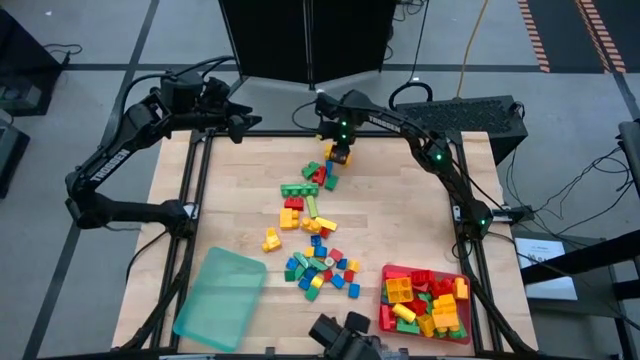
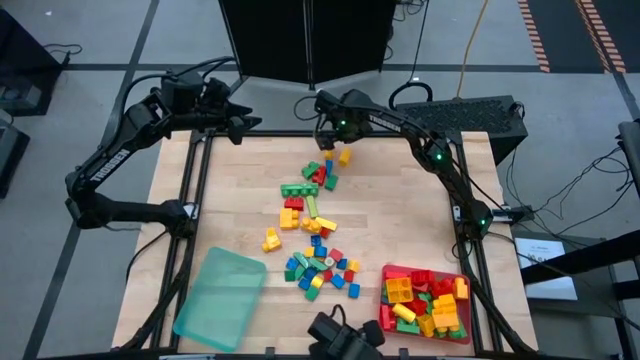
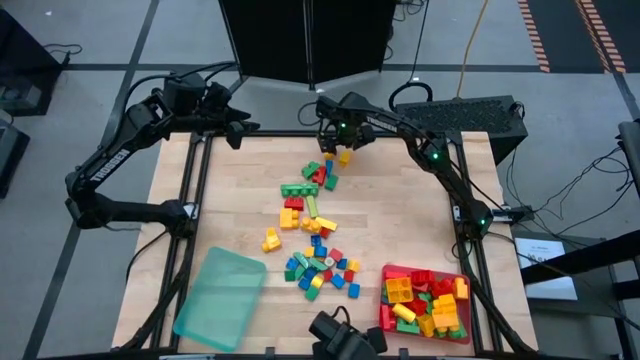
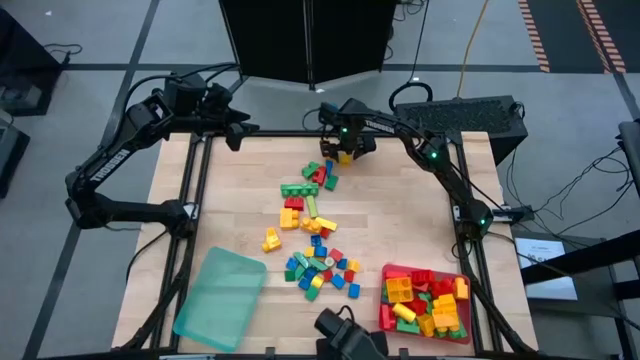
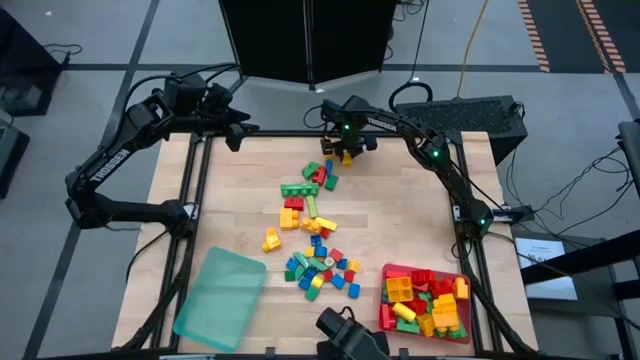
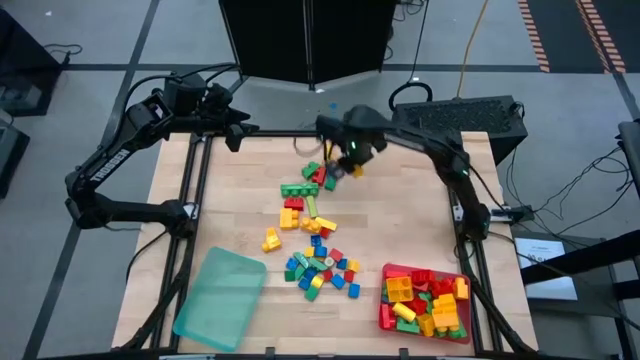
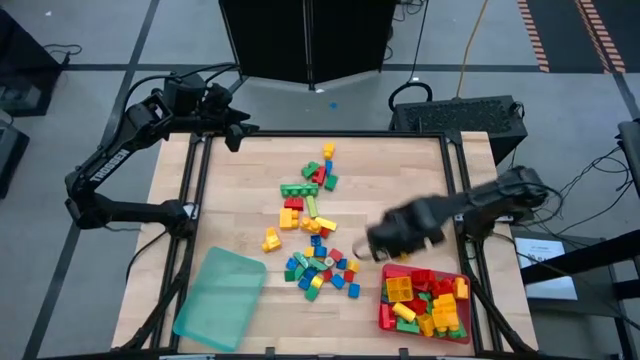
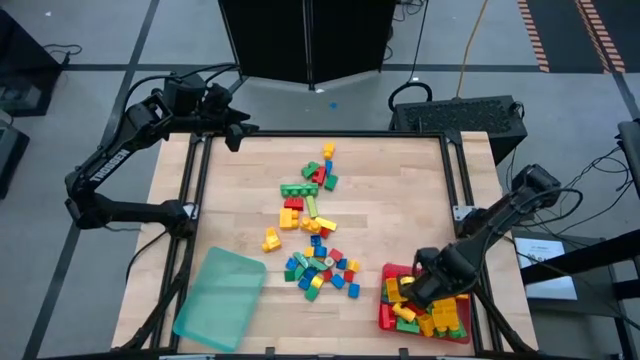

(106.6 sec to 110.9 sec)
Task: Sort blocks by size
Put the 1-stud yellow game piece into the pink bin

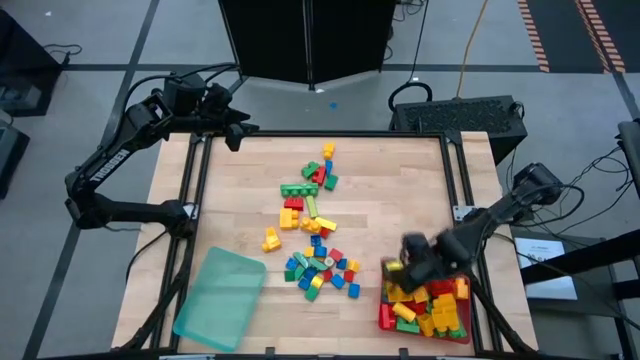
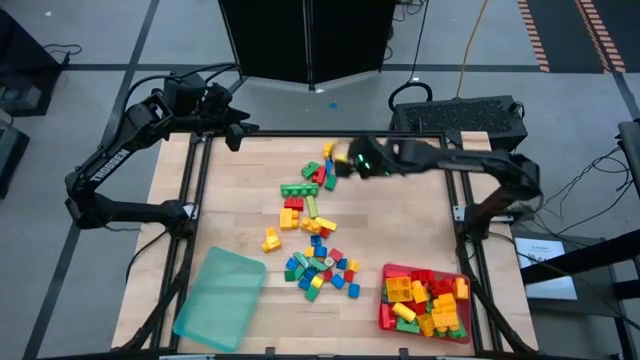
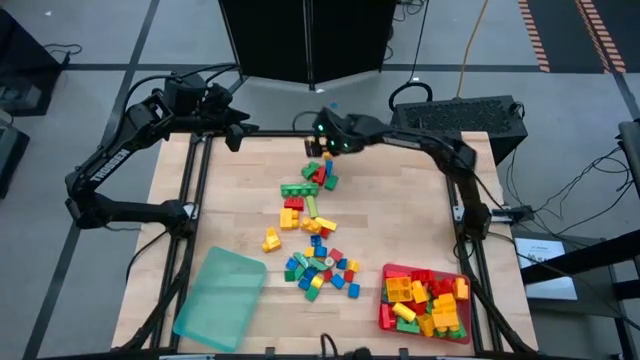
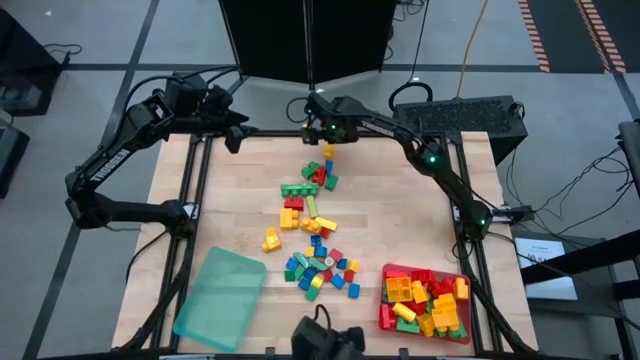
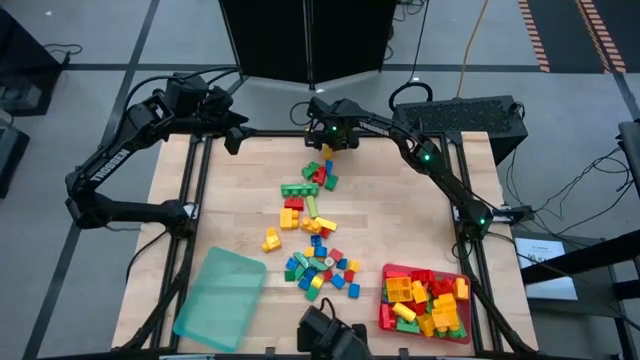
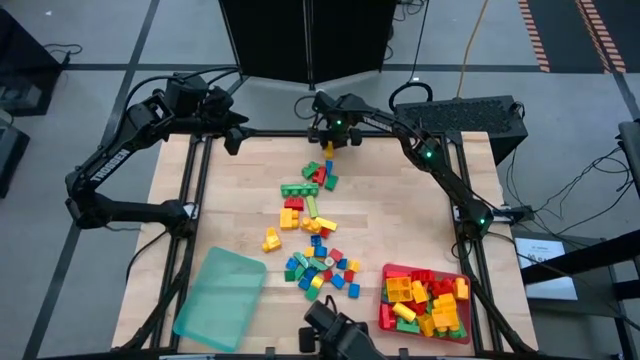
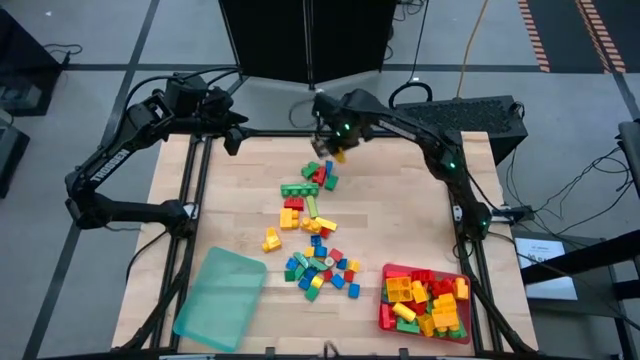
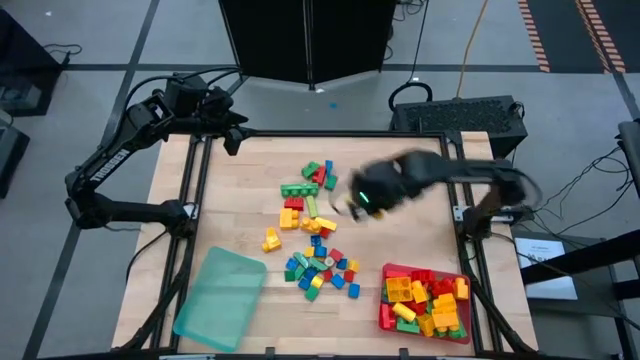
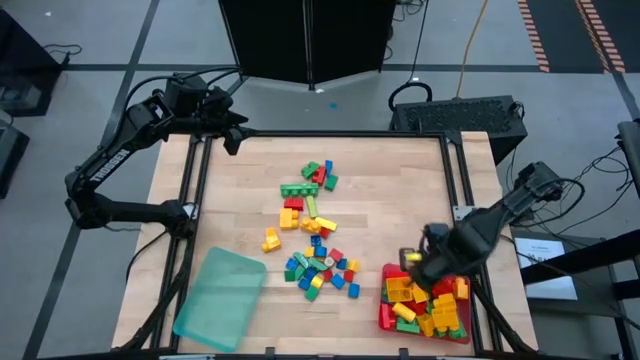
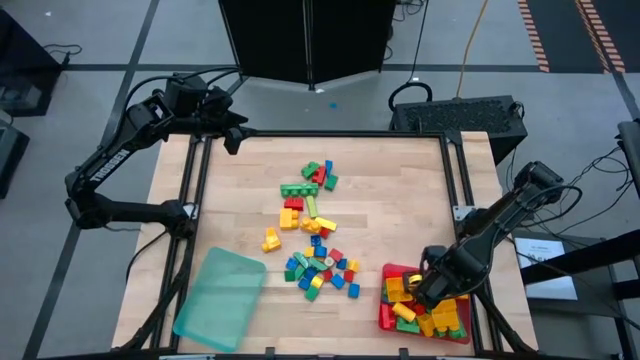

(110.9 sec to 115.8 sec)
Put the 1-stud yellow game piece into the pink bin

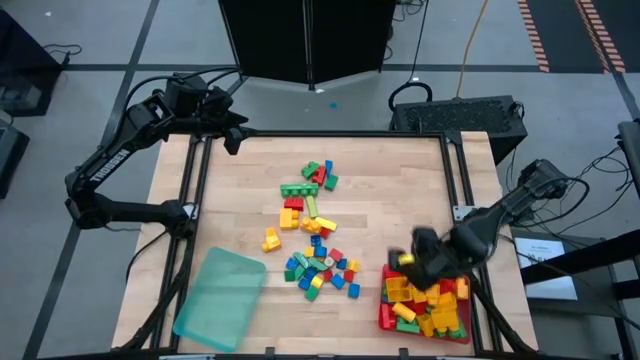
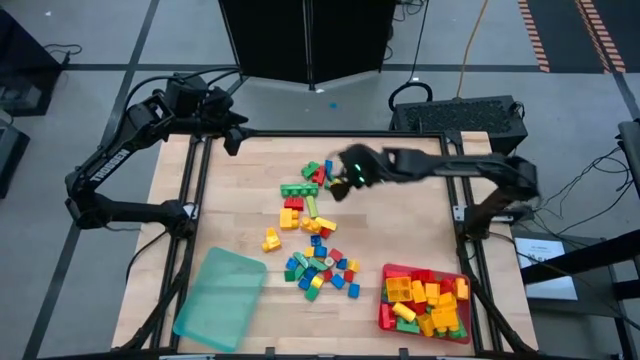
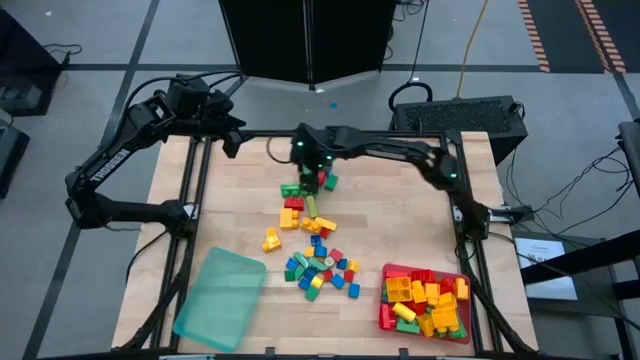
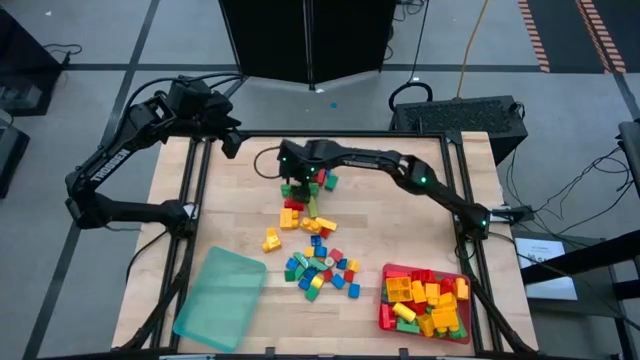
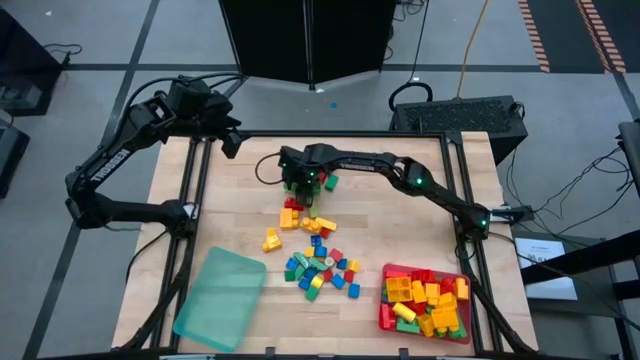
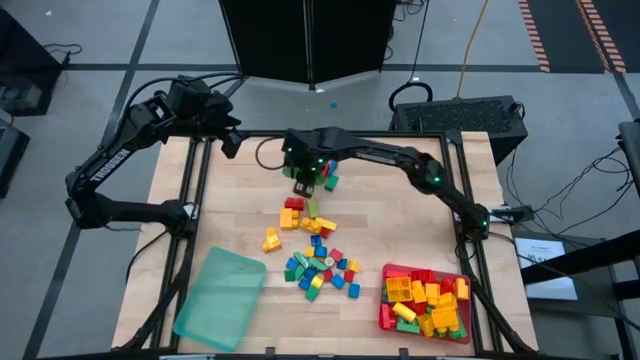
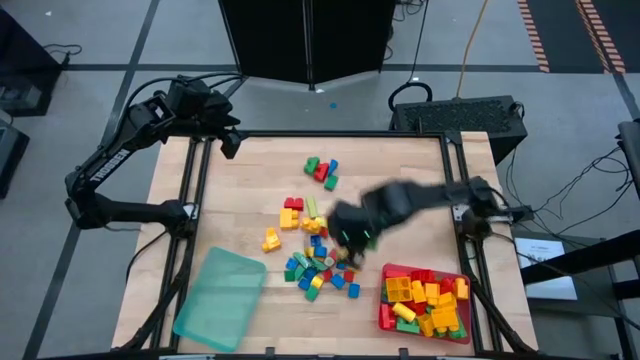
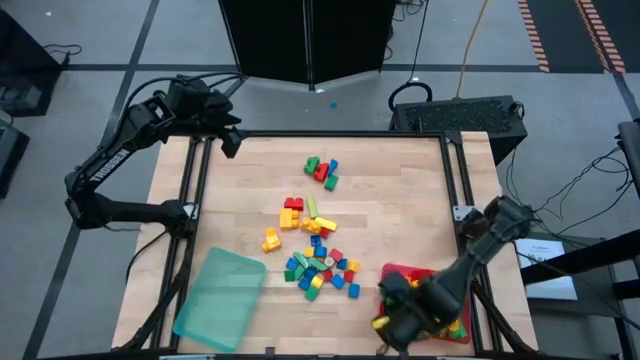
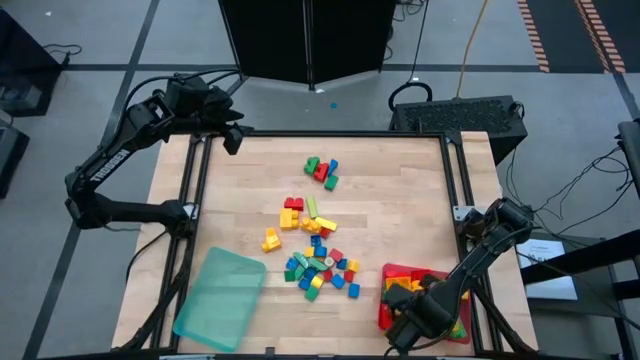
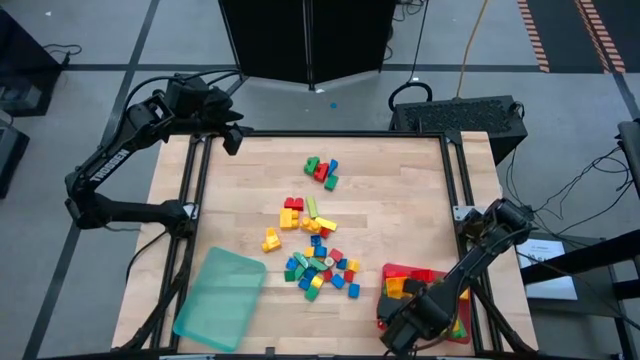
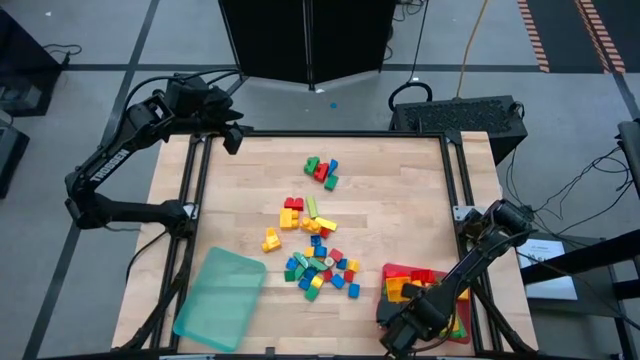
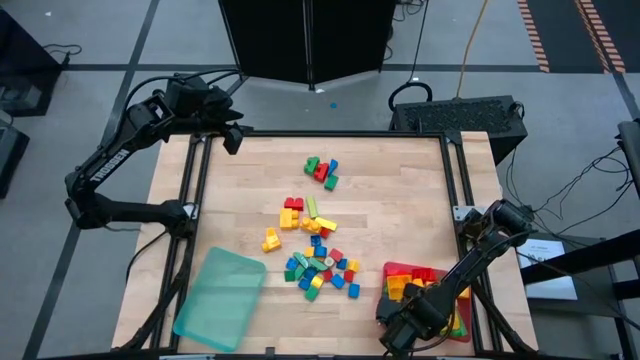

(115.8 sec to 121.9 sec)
Put the 4-stud green game piece into the pink bin

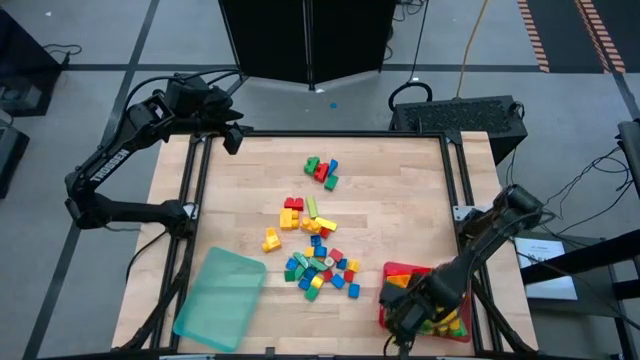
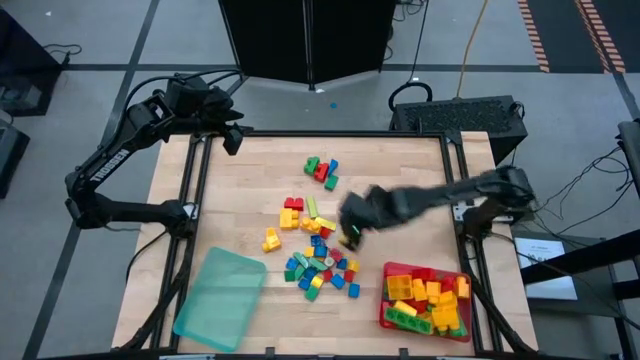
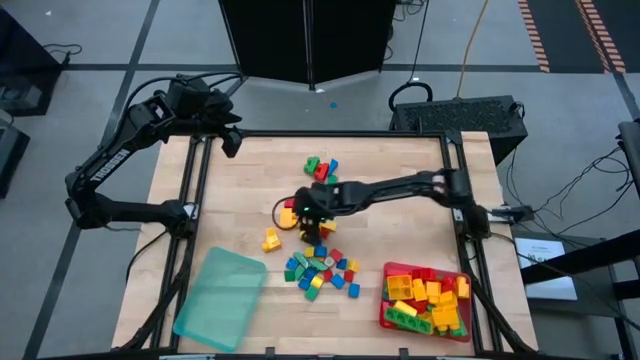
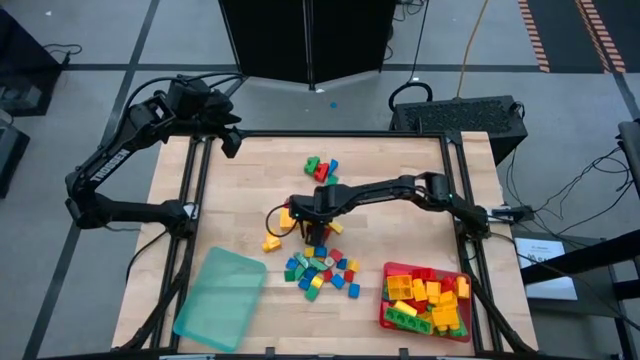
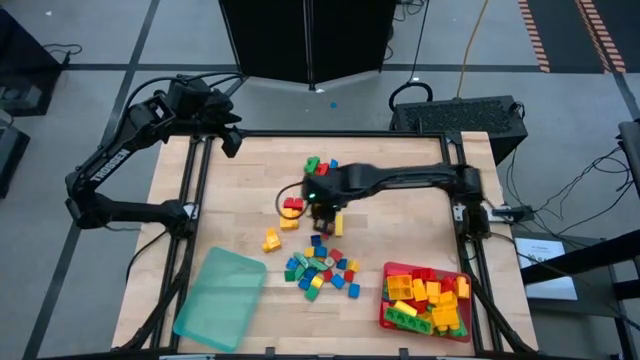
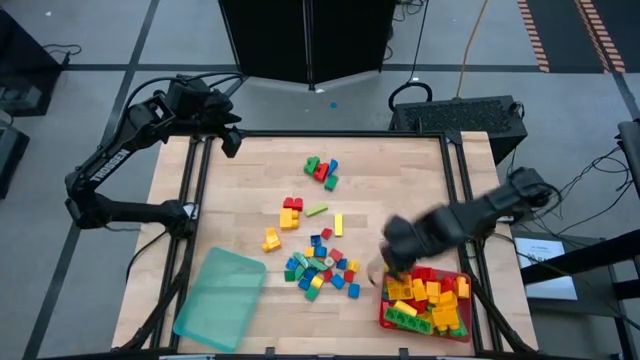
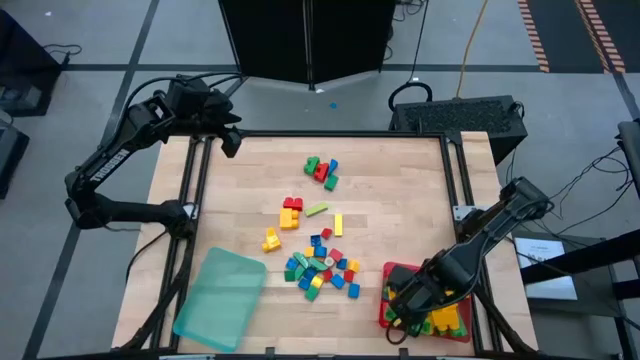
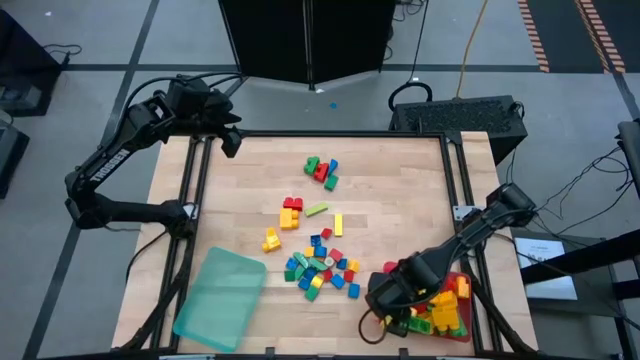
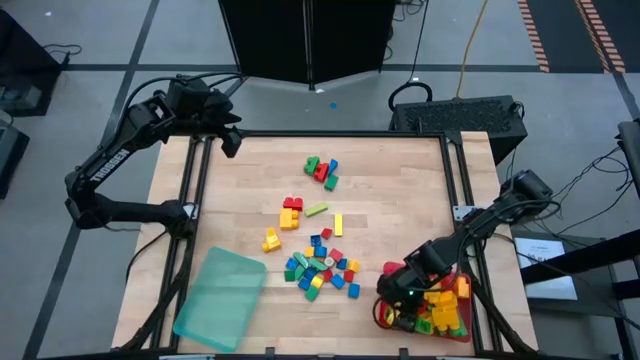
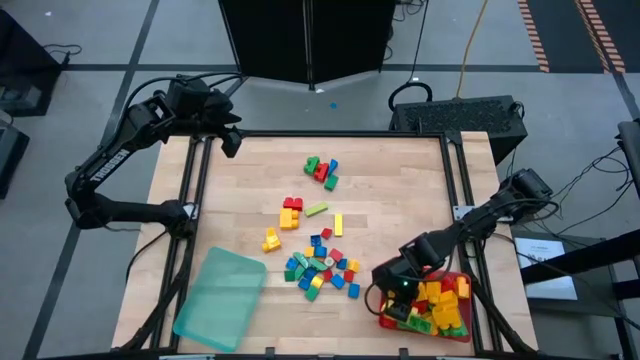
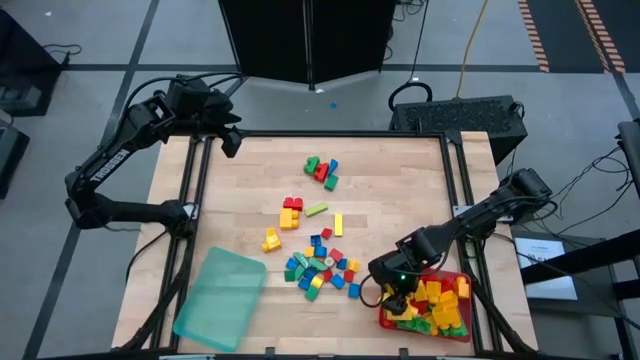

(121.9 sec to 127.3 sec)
Put the 2-stud yellow game piece into the pink bin

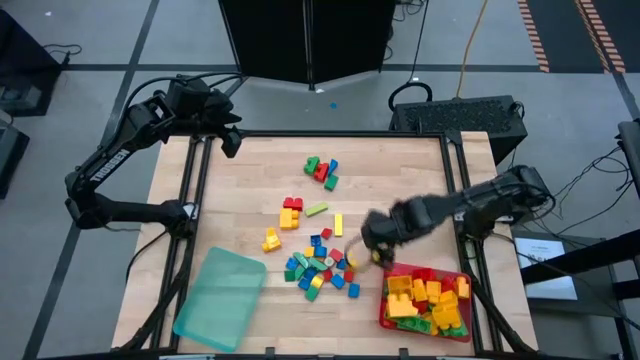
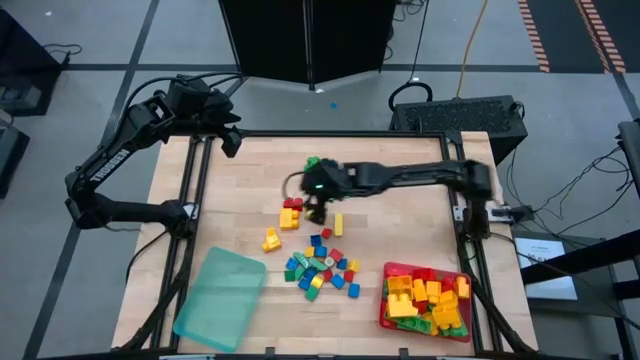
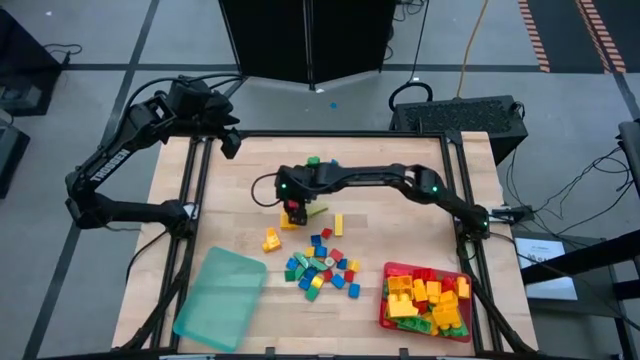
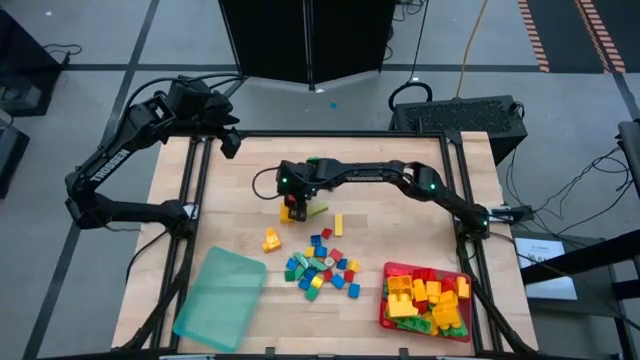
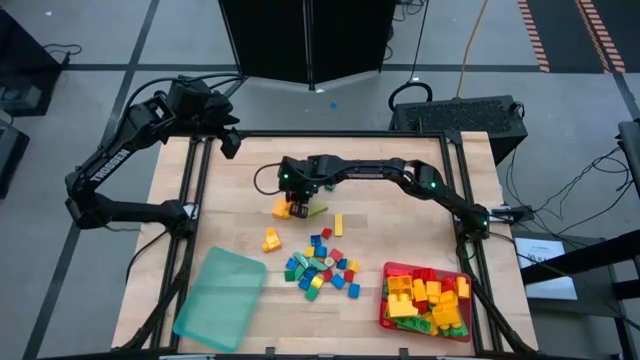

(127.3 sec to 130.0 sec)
Put the 2-stud red game piece into the pink bin
